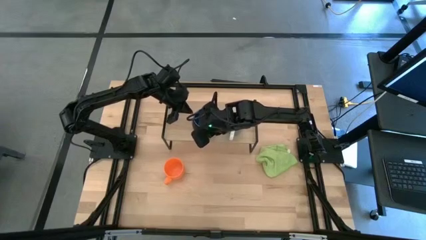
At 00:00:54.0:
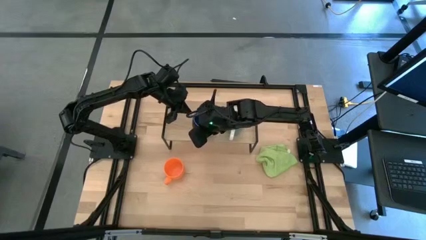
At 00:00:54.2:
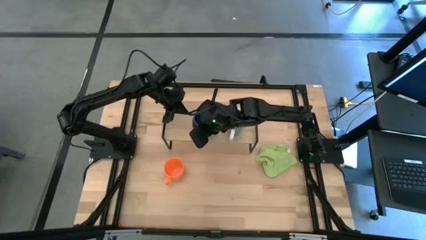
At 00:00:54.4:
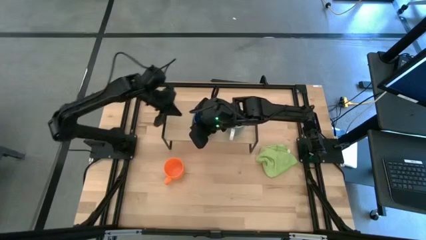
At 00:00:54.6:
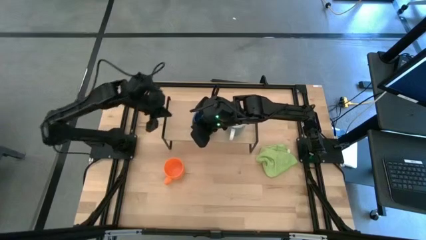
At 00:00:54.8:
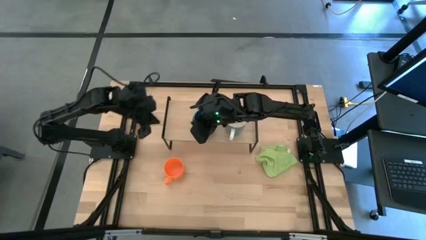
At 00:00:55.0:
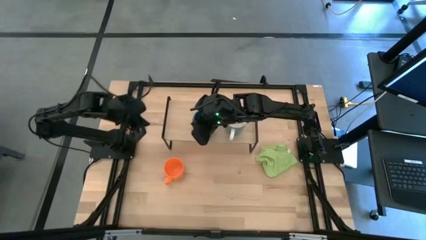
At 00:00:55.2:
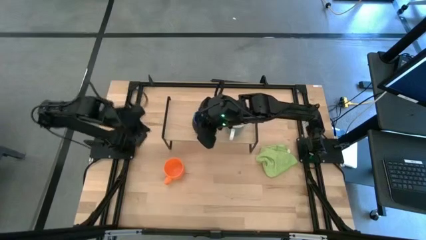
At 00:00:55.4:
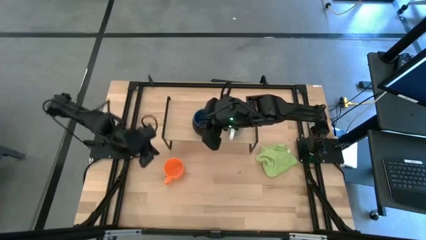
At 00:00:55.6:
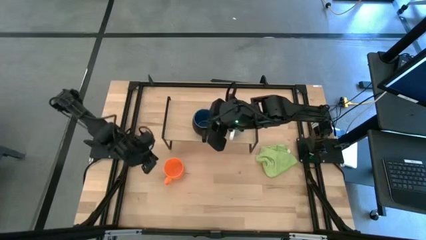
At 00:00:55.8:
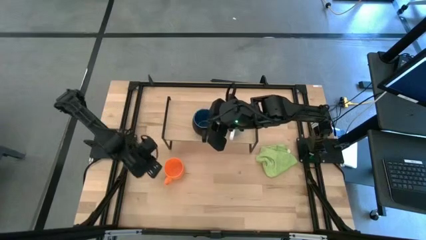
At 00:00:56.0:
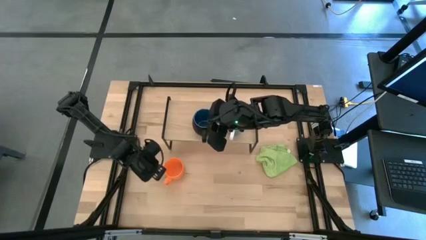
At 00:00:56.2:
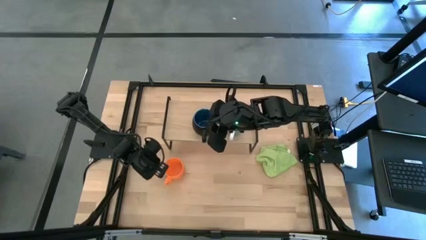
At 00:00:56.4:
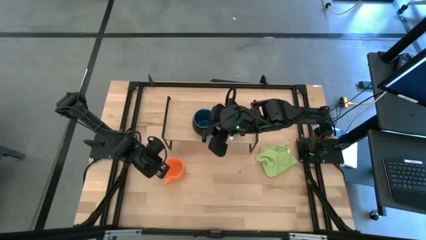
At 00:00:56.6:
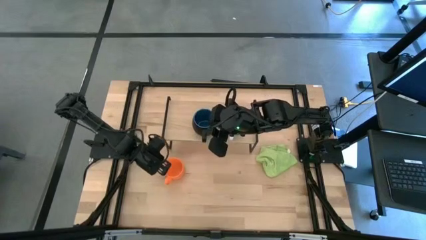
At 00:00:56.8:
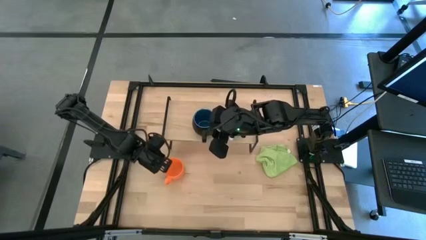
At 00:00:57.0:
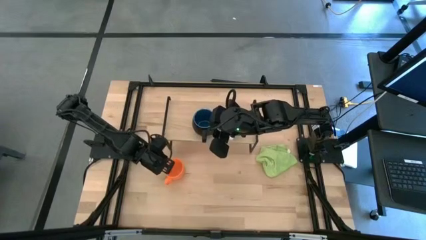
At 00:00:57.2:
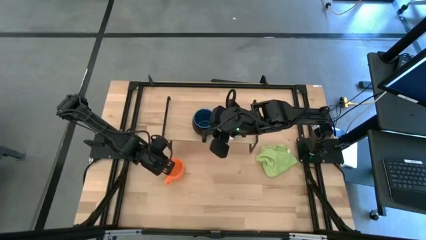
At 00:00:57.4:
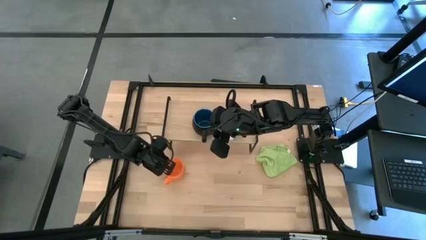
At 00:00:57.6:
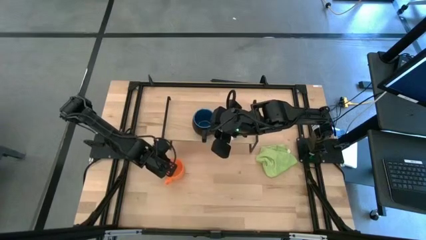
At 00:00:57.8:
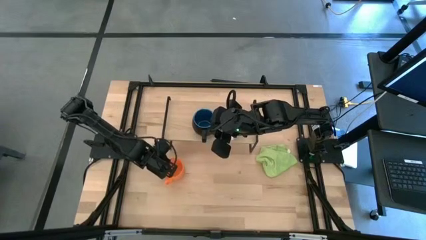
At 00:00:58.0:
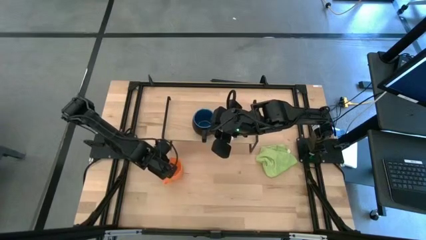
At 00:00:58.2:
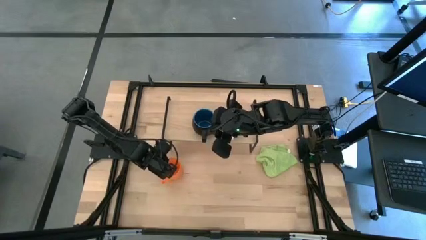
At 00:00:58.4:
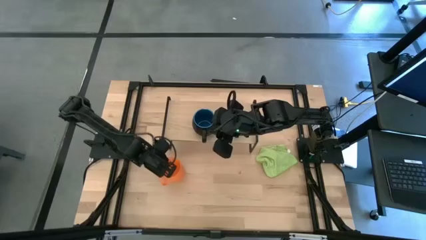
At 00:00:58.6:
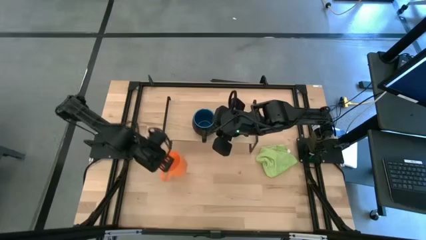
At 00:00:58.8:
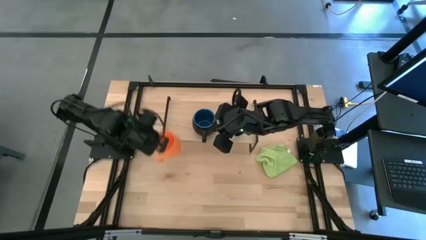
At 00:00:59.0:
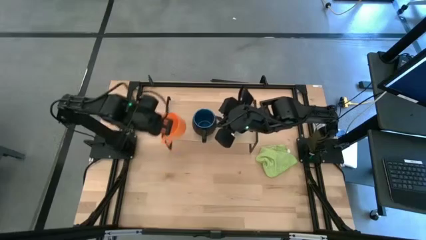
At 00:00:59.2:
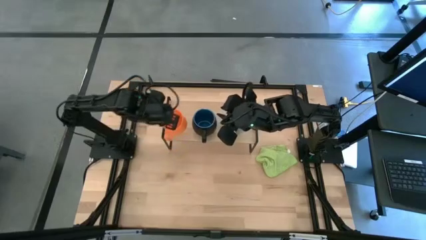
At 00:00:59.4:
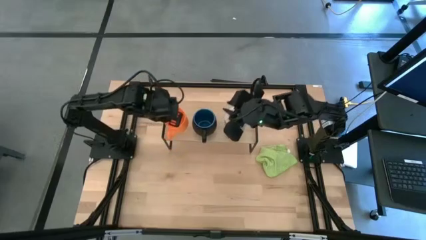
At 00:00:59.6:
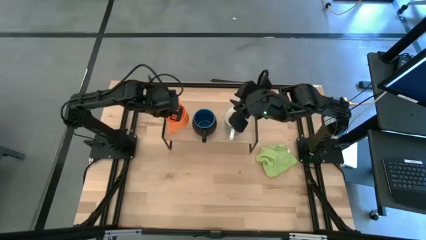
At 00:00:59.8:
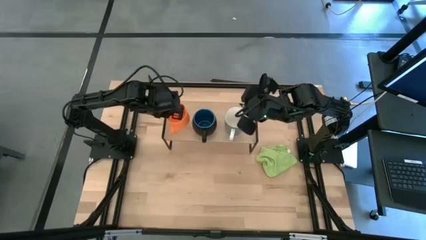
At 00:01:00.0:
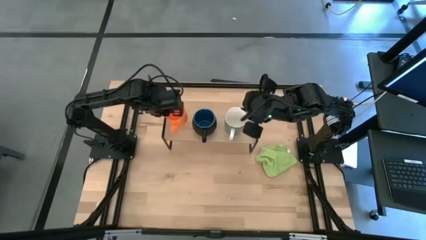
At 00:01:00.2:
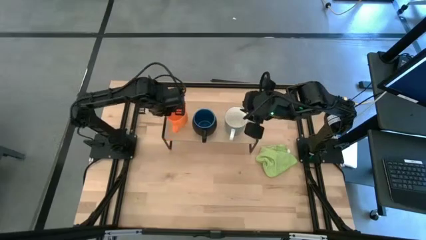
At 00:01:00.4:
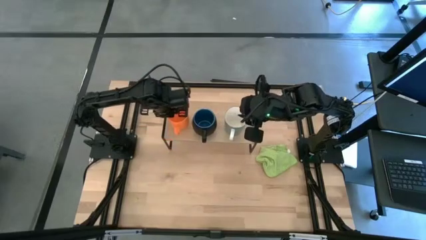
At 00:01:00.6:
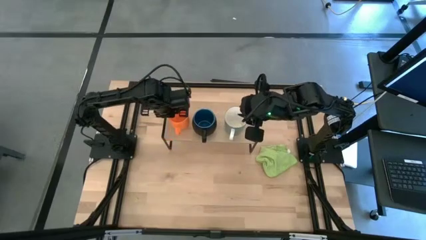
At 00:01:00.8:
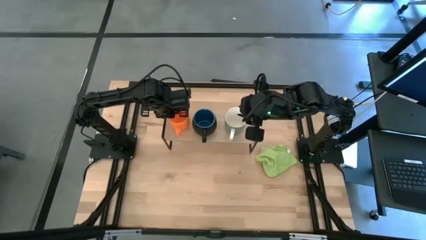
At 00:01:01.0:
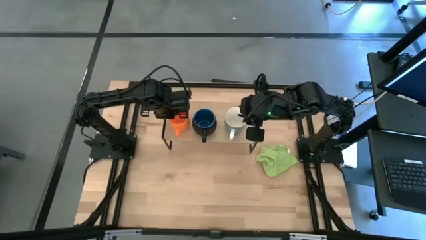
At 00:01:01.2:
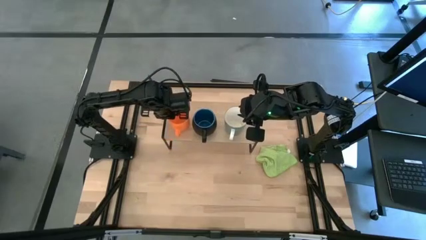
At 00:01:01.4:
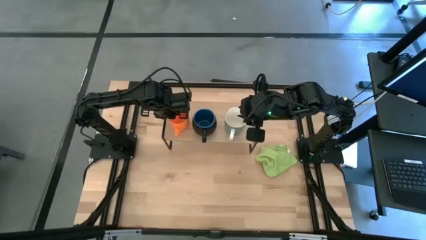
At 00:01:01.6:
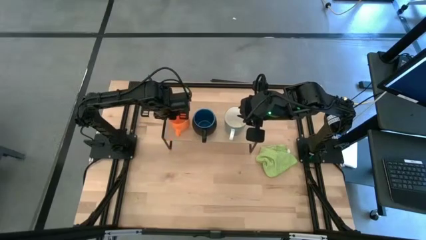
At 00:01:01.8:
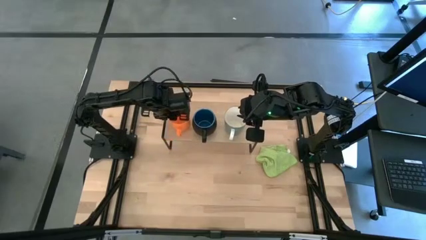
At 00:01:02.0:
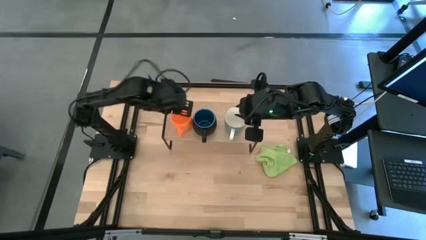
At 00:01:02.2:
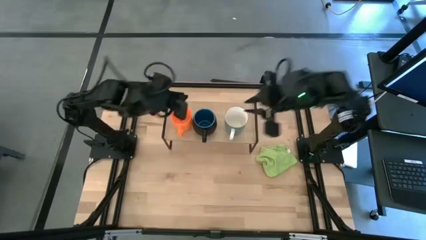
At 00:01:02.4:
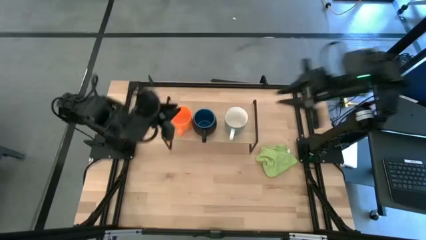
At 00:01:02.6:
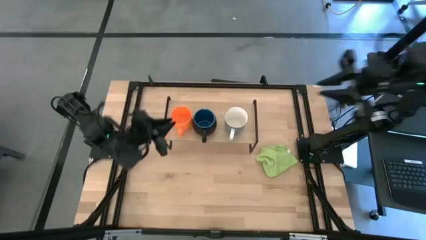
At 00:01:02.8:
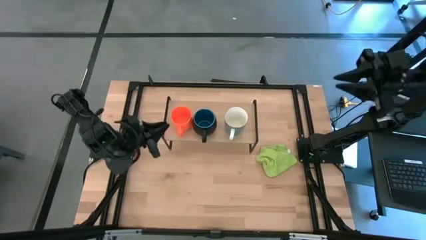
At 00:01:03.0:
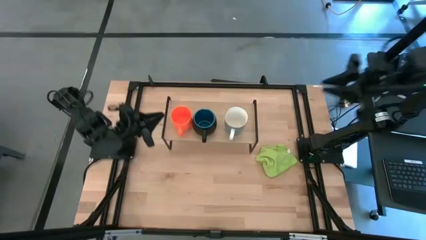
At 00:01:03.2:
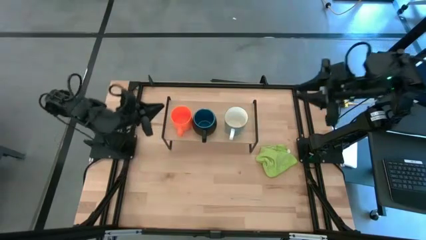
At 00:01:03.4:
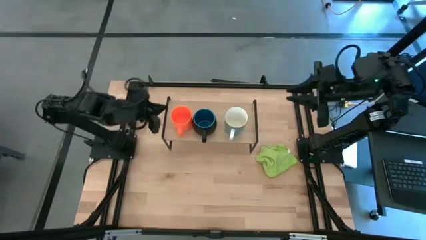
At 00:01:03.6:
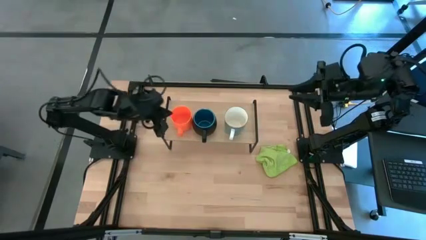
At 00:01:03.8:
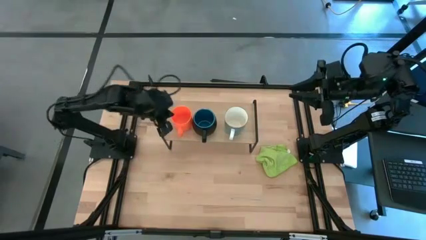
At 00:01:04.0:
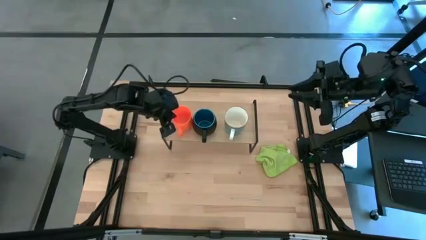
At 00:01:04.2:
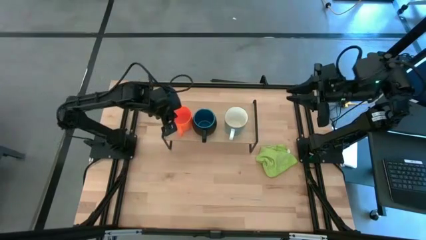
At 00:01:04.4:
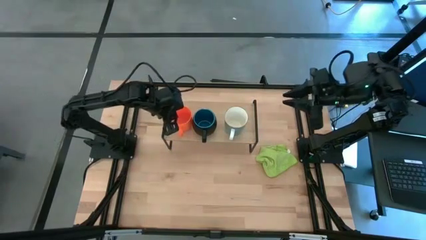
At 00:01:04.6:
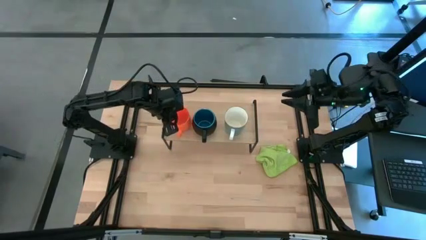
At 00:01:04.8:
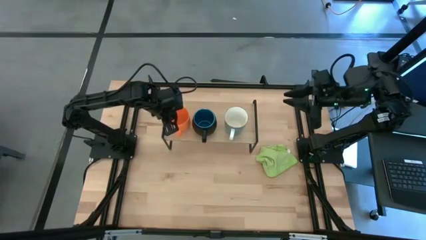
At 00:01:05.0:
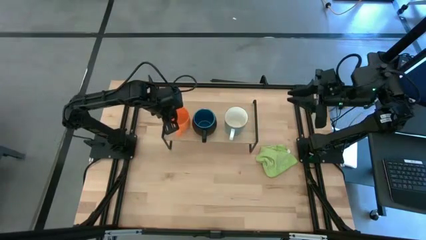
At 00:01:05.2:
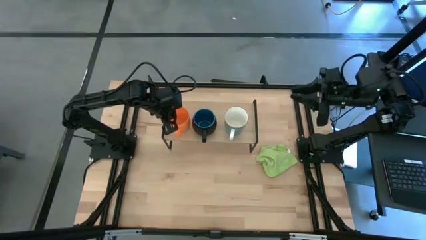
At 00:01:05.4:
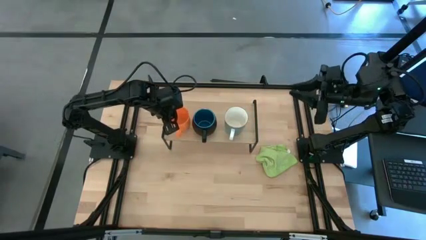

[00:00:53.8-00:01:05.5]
Task: Stack small to large cups/mugs on shelf
Put the orange mug on the shelf
